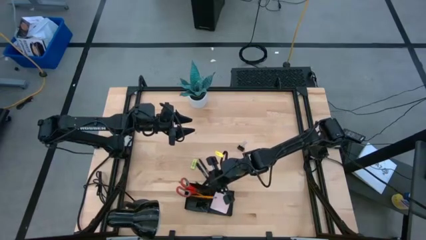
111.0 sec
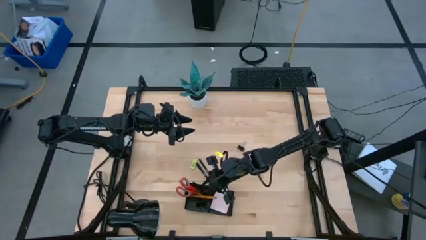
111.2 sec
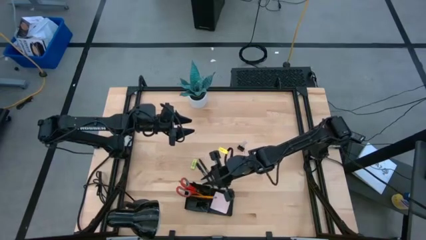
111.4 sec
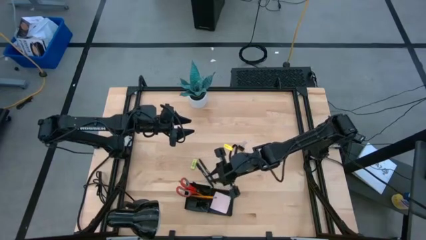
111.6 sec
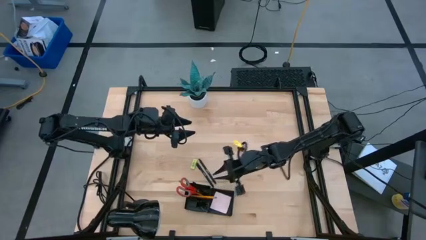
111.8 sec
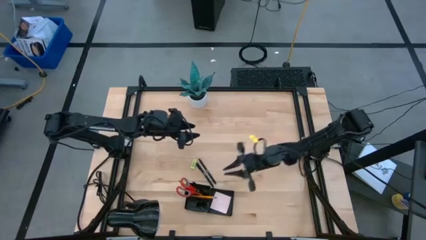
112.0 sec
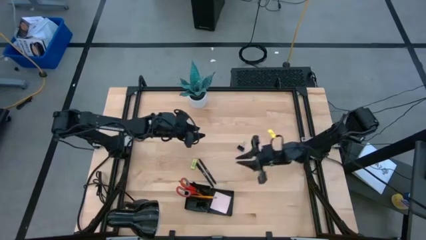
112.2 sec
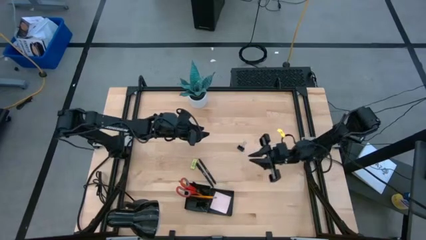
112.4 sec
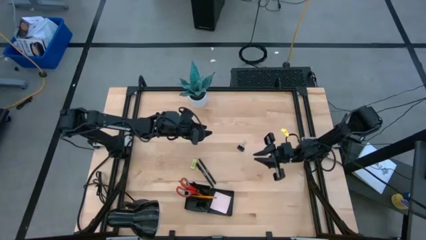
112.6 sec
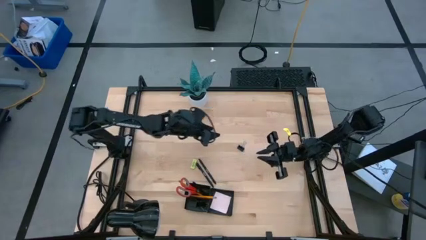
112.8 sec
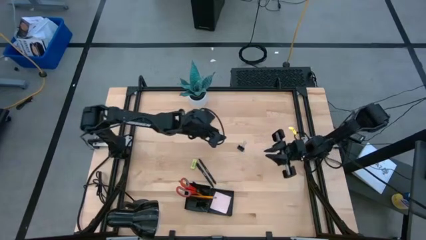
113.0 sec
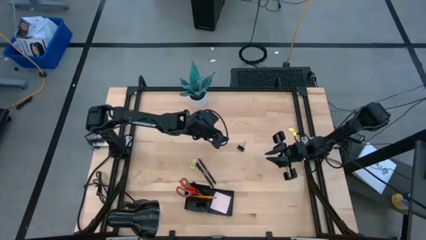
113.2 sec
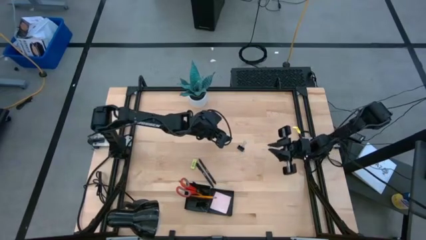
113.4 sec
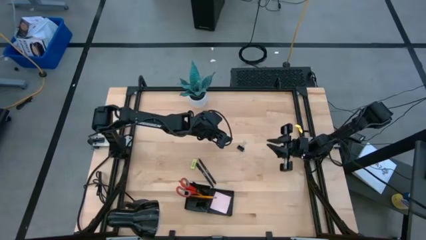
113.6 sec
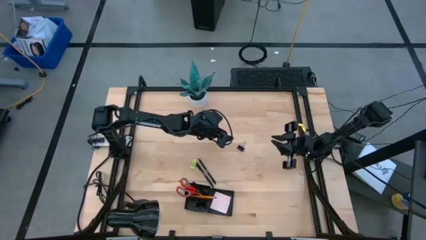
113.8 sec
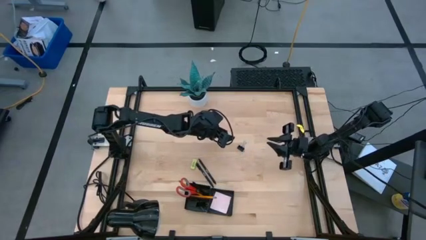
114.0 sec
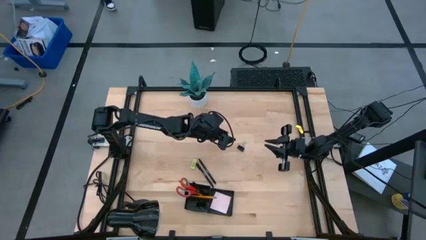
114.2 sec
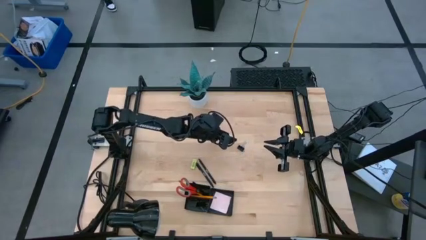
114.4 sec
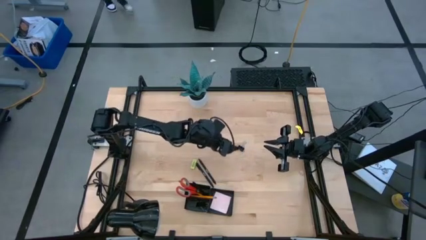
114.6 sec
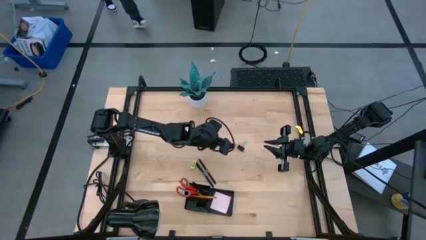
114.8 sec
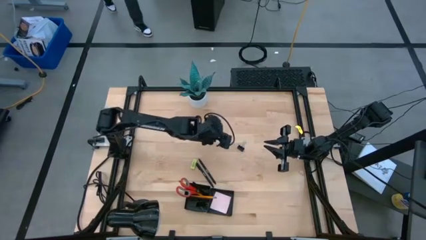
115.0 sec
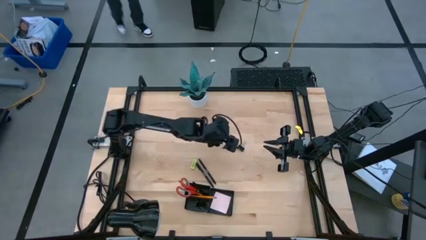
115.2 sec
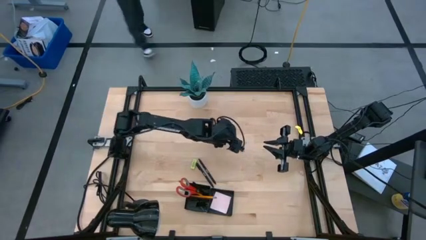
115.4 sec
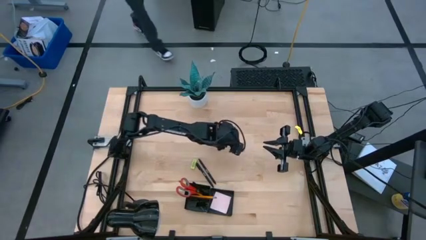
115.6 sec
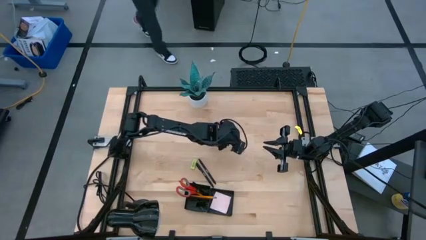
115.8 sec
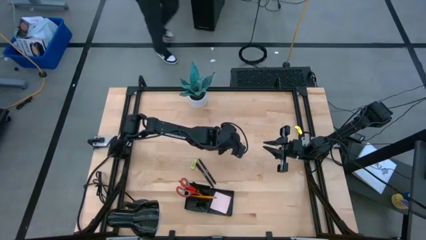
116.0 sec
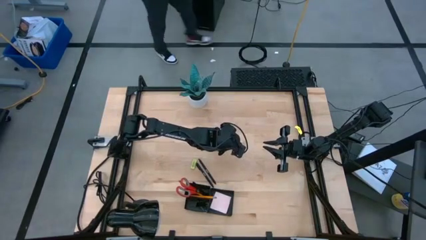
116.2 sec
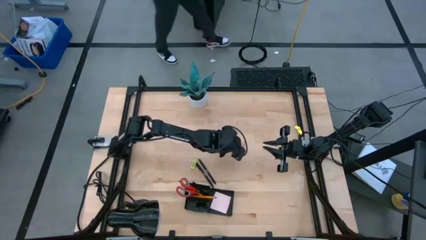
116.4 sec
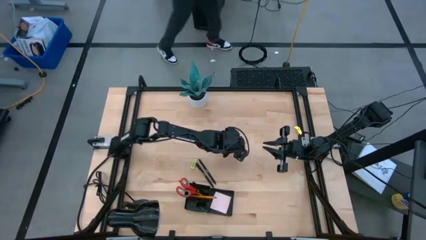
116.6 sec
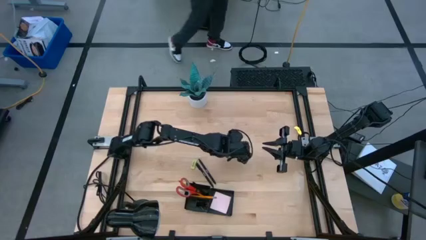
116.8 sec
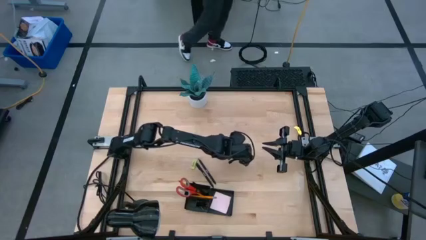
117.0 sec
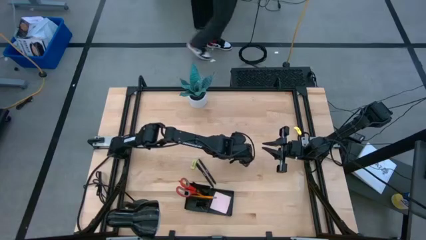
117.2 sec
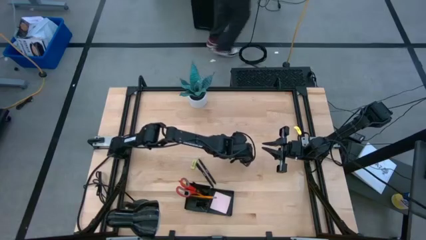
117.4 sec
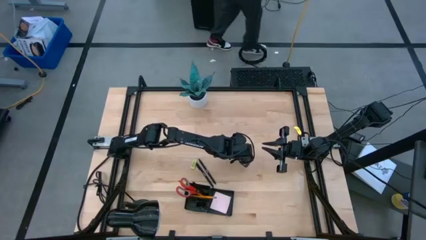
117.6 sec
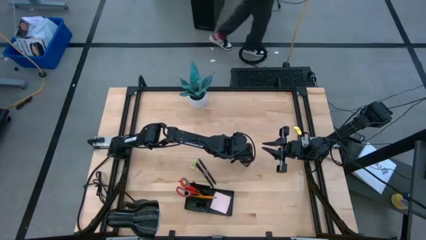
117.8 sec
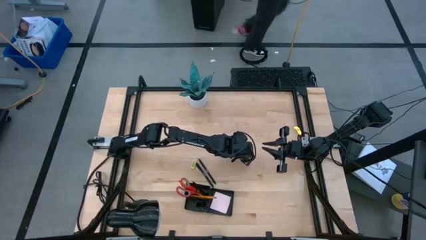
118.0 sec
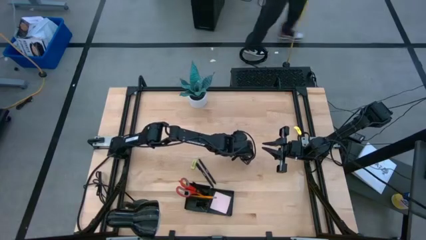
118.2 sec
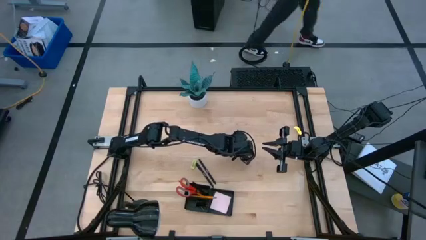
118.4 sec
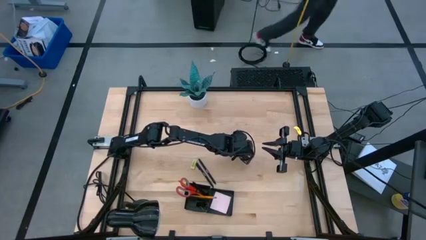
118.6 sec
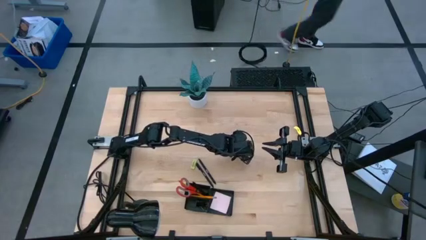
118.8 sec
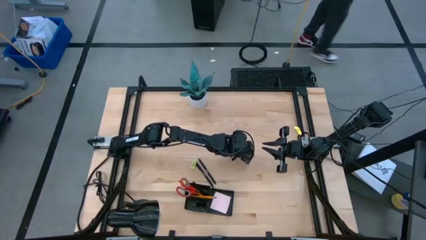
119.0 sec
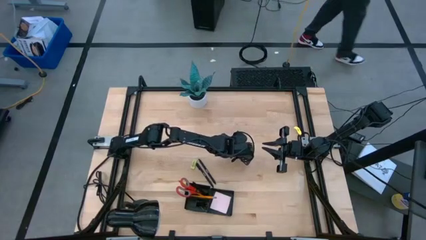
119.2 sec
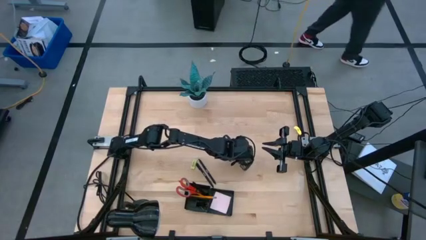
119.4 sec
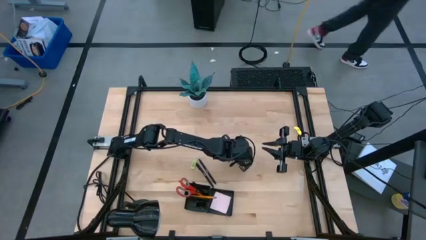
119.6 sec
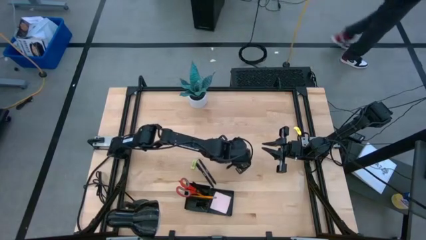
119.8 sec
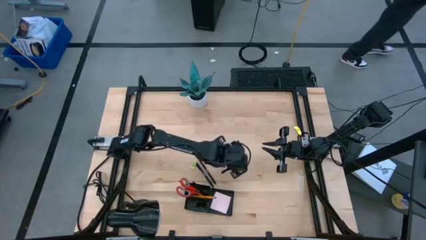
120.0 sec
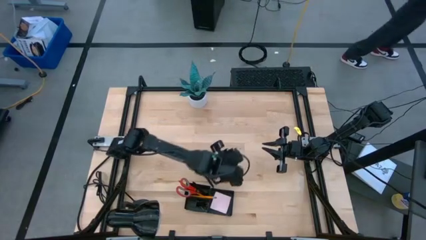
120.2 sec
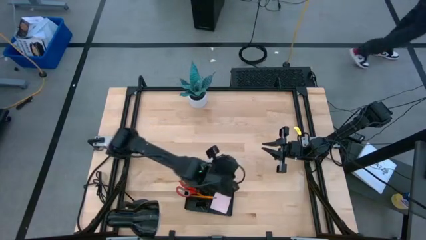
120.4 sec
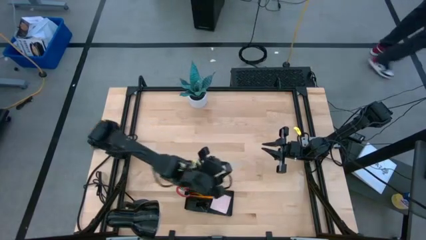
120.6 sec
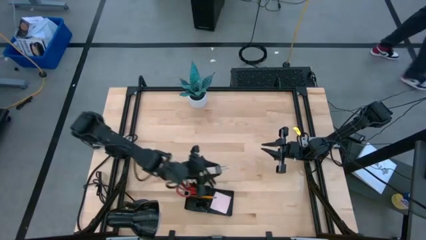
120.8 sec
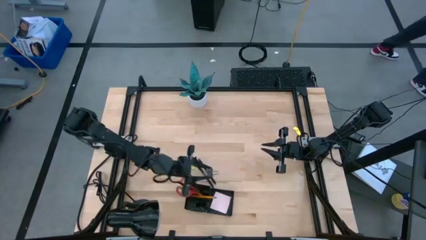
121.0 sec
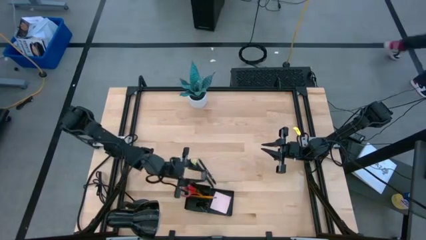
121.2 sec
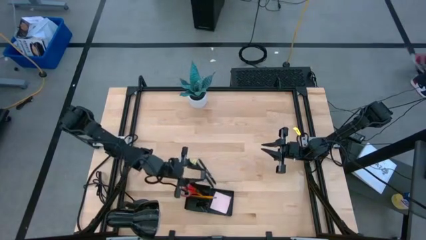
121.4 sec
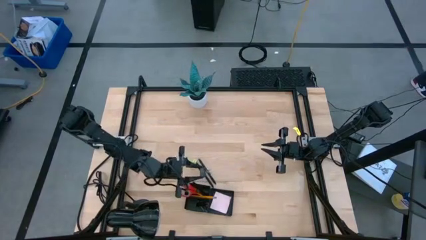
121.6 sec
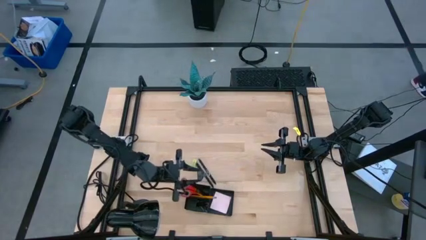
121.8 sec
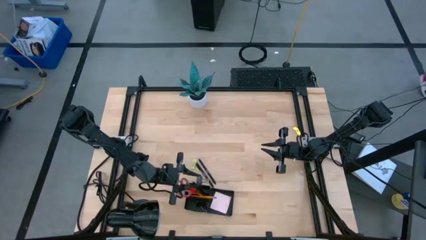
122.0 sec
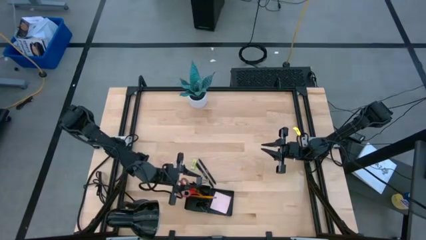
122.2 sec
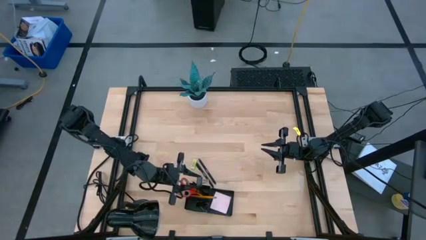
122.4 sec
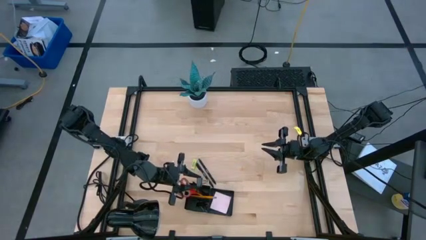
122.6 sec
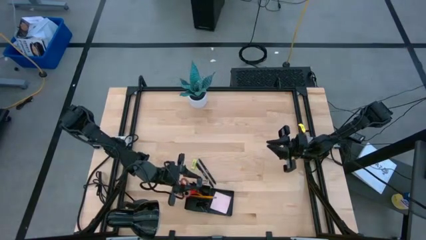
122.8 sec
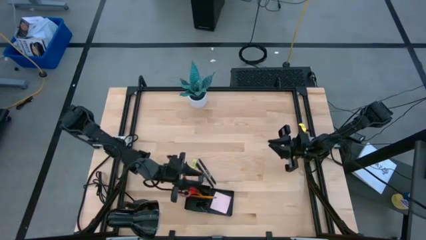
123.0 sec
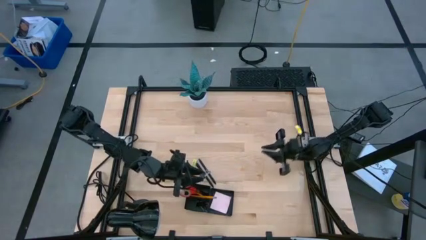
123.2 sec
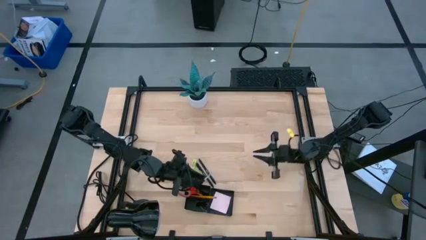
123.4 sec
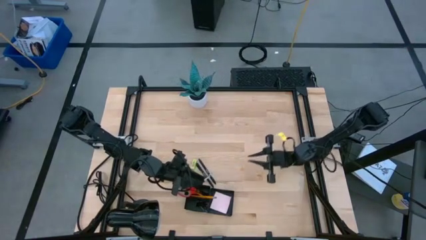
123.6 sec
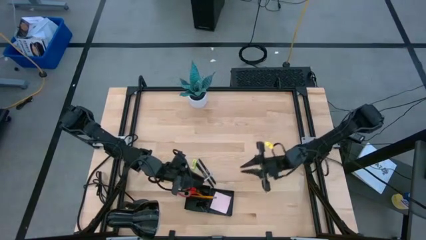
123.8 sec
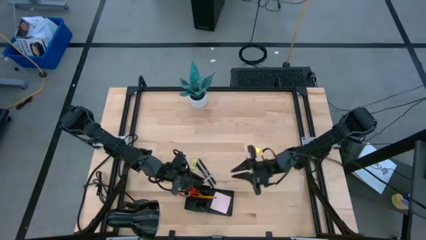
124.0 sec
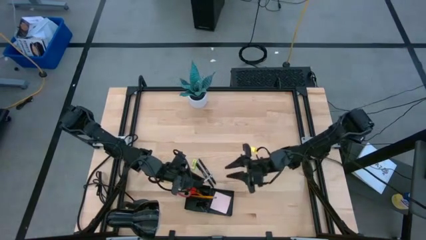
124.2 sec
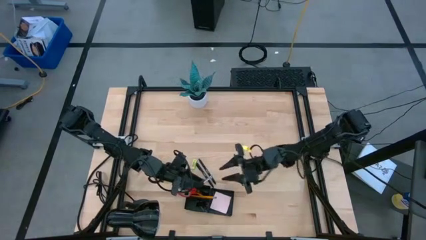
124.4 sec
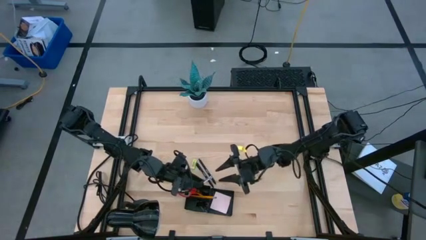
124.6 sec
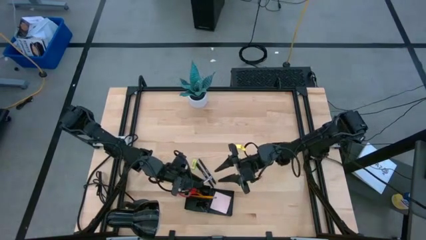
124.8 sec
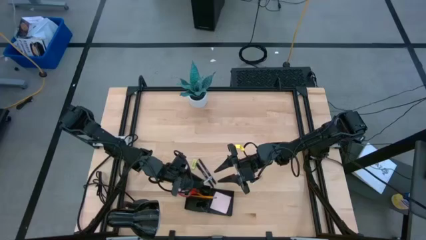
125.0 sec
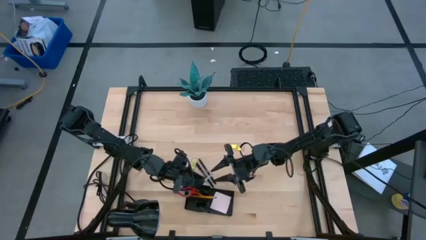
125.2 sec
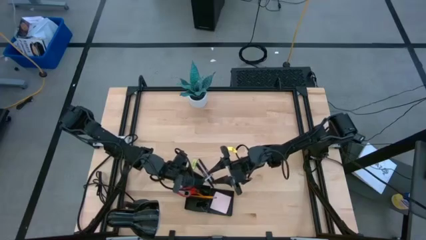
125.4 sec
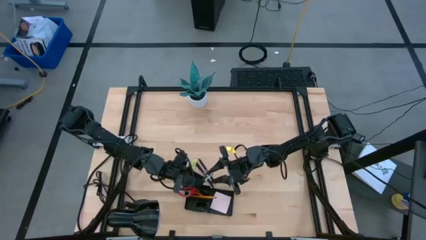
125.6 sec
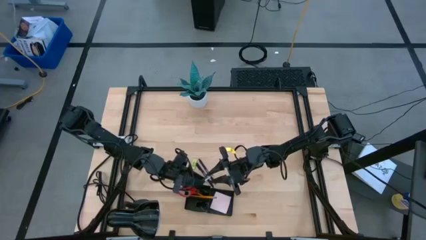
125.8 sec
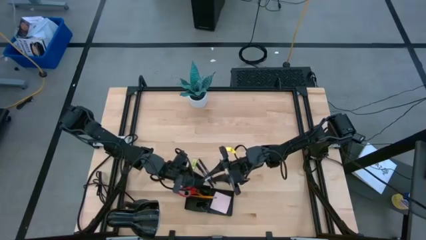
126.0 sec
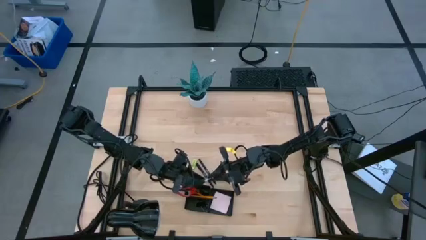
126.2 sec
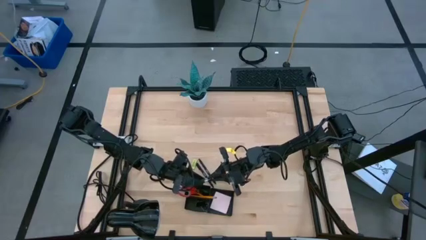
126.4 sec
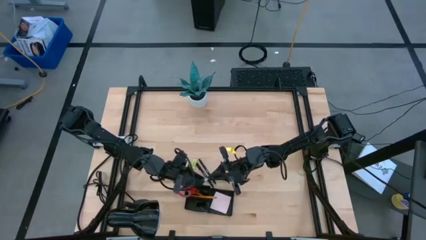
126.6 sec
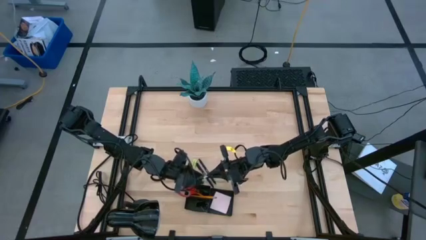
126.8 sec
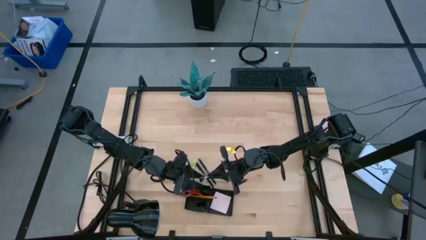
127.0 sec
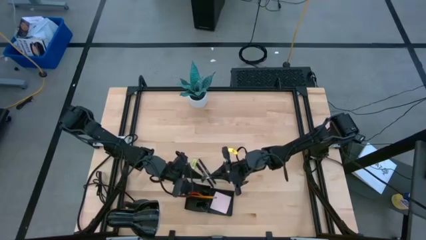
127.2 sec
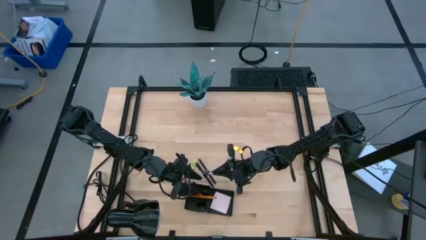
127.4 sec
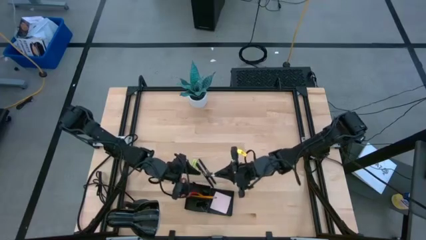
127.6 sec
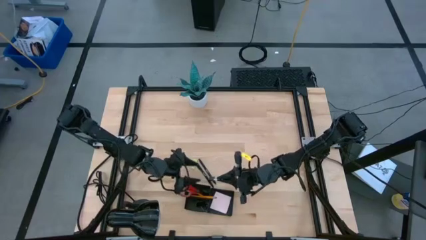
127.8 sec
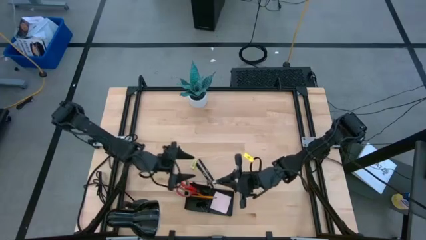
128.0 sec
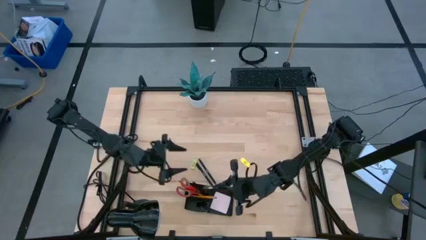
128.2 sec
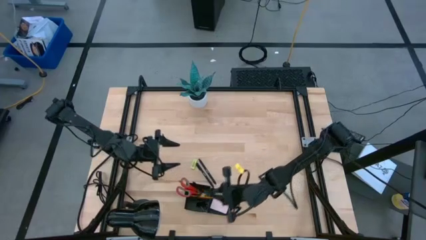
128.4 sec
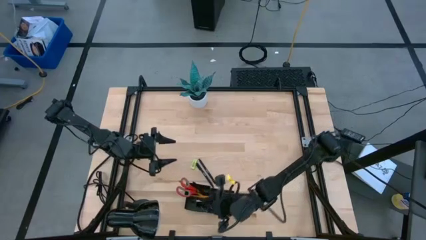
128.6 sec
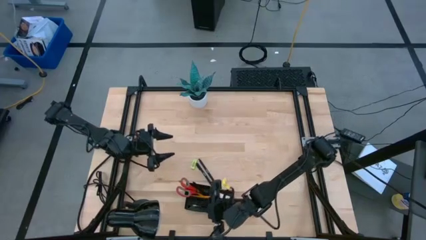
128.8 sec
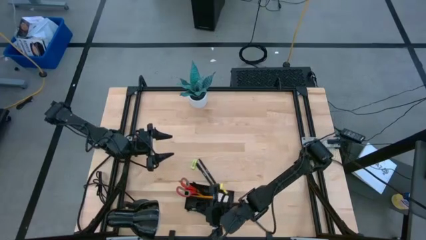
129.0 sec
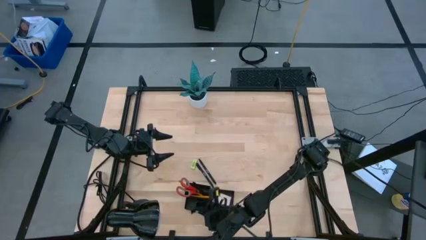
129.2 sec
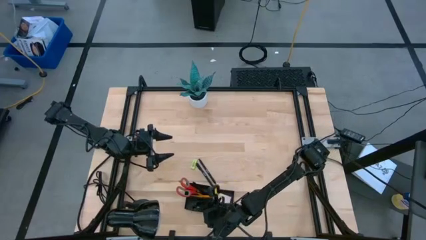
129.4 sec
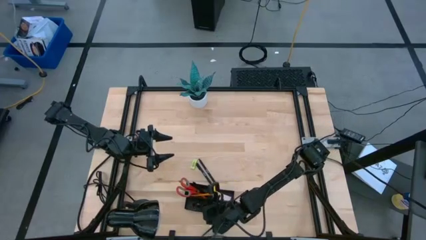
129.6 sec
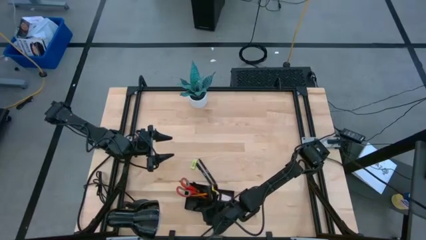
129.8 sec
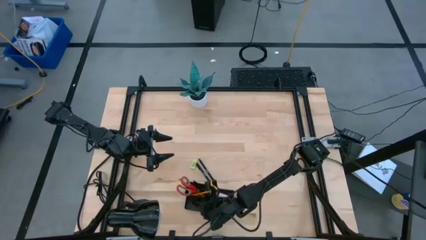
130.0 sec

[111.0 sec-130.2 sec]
Task: Pick and place office supplies into organizer
Put the black binder clip into the black desk organizer
